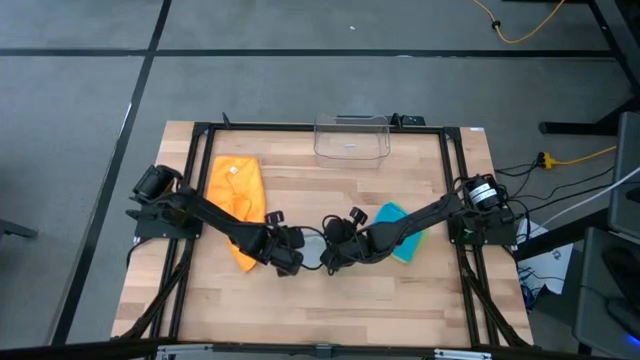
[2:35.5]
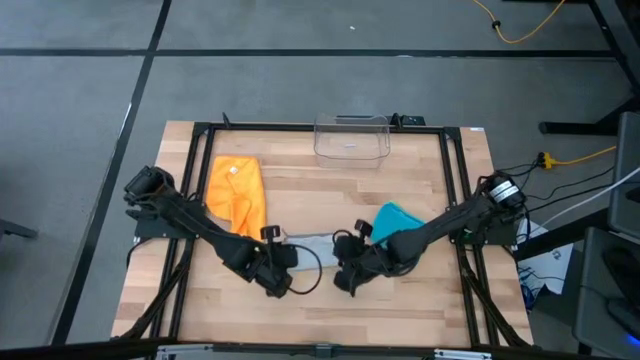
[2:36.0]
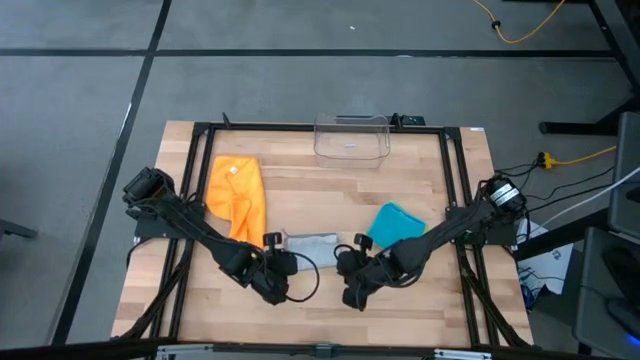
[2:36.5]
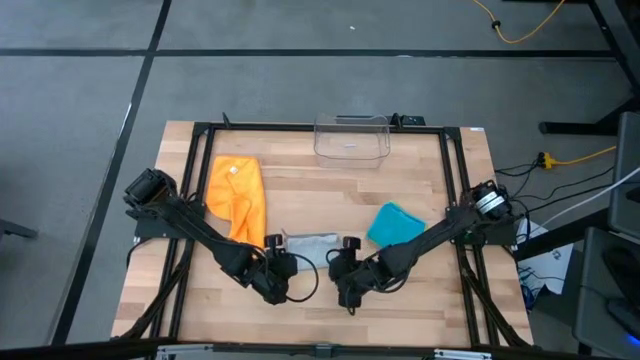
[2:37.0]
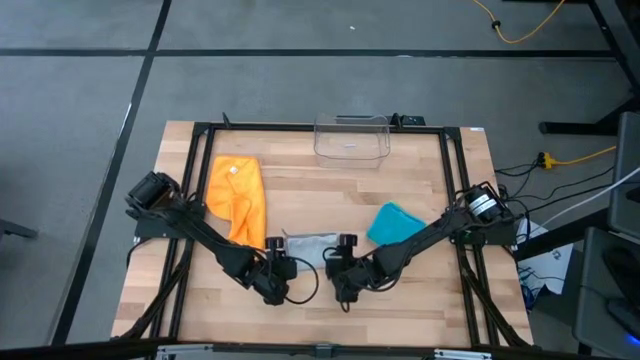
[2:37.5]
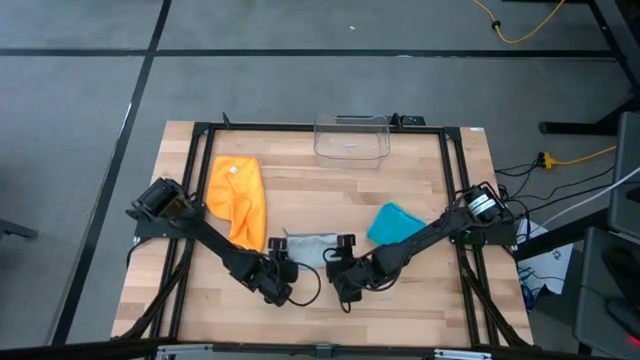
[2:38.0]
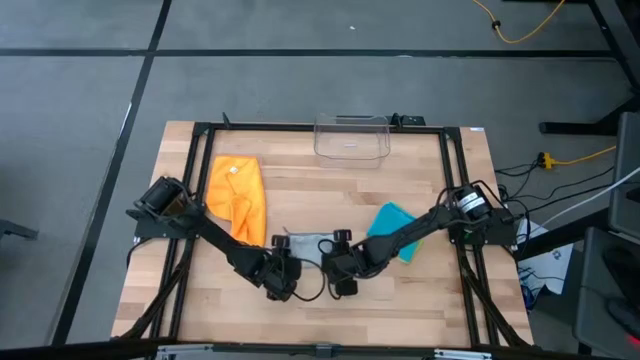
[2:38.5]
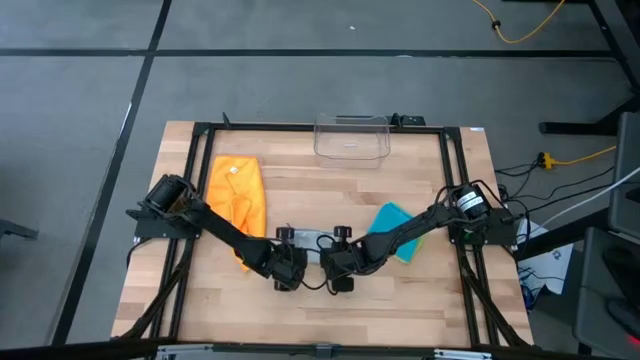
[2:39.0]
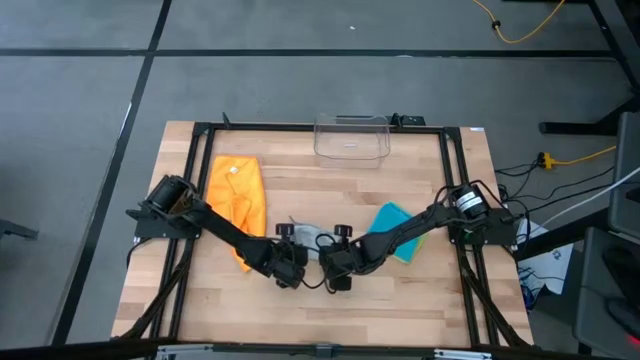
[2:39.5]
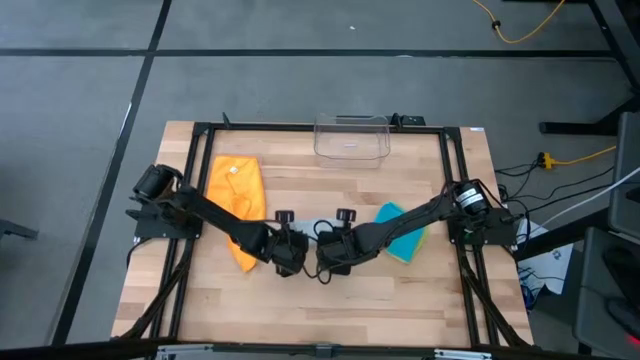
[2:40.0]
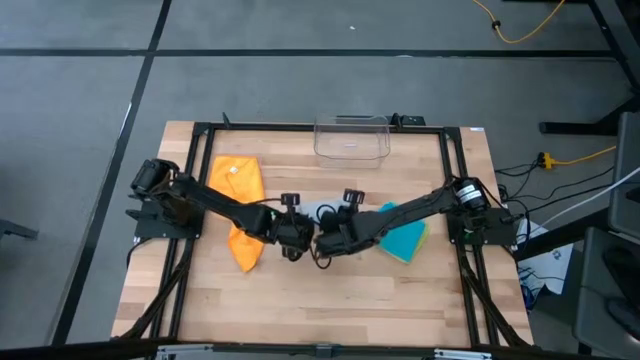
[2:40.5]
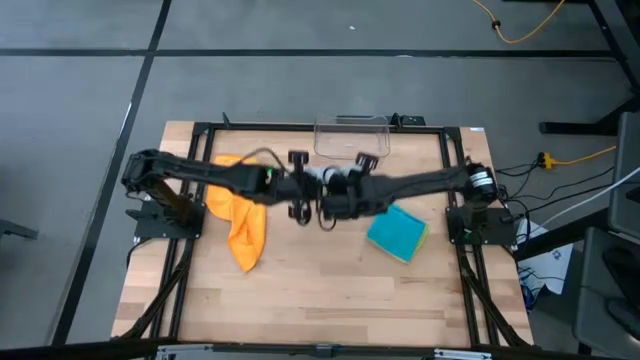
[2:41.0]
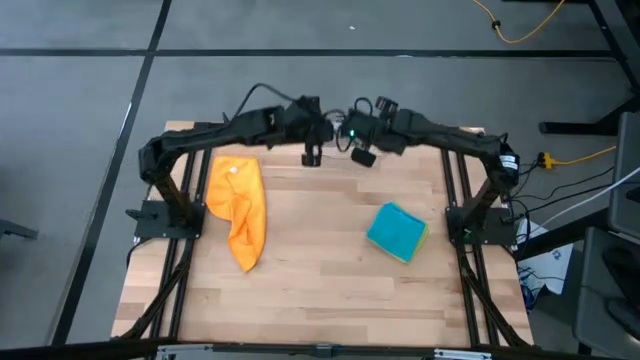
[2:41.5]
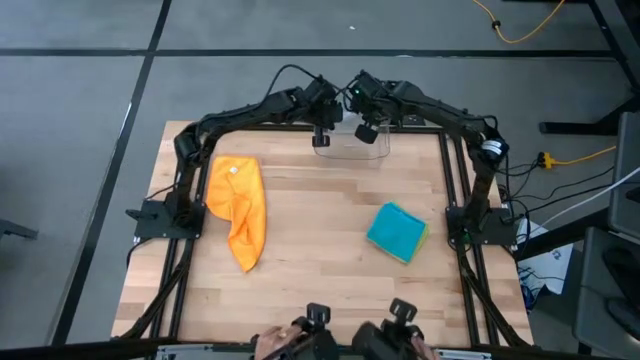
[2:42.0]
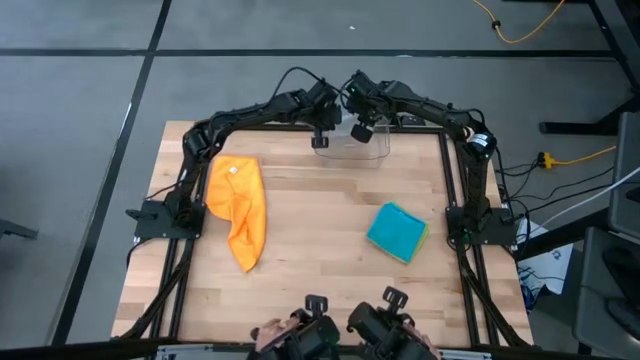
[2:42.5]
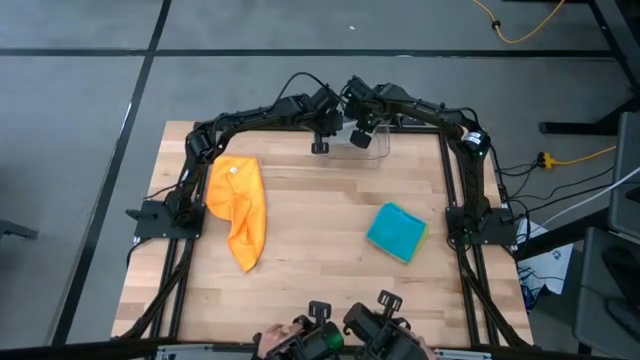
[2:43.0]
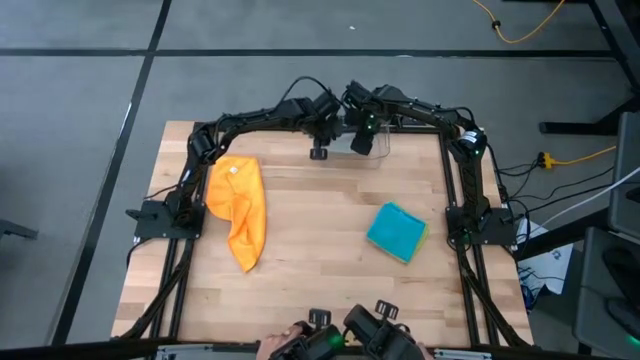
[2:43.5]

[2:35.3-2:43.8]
Task: Fold microfiber towels
Put the gray microfiber towel into the transparent bin

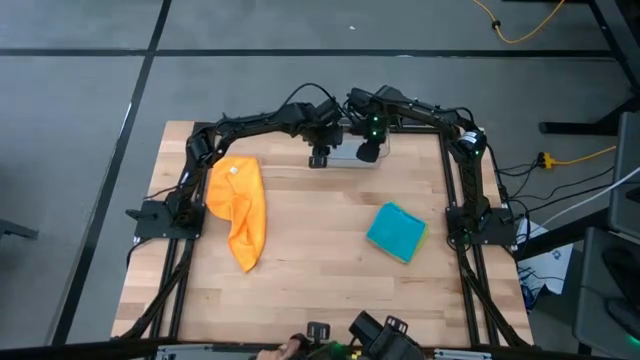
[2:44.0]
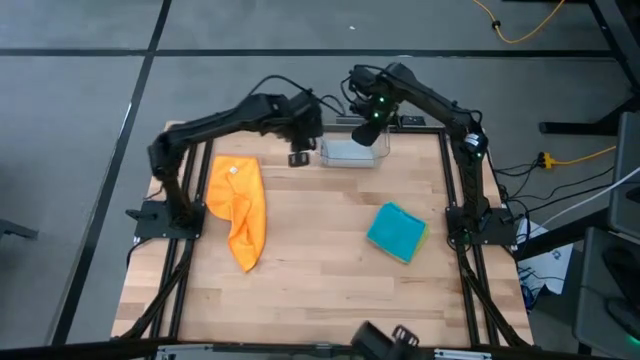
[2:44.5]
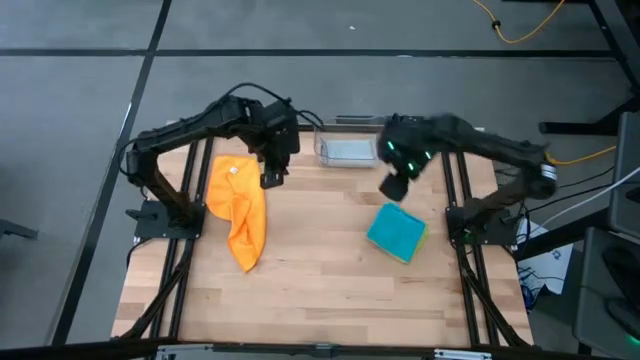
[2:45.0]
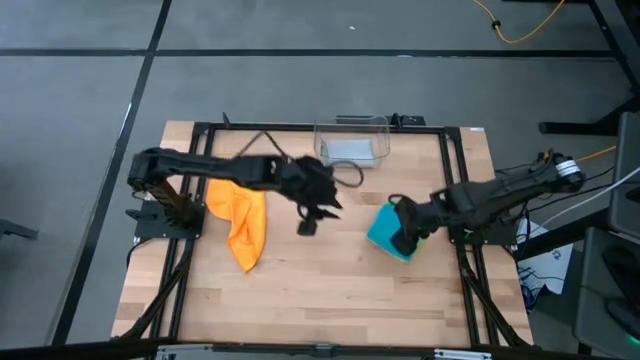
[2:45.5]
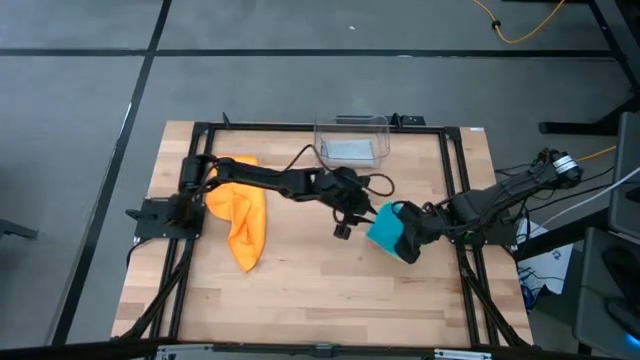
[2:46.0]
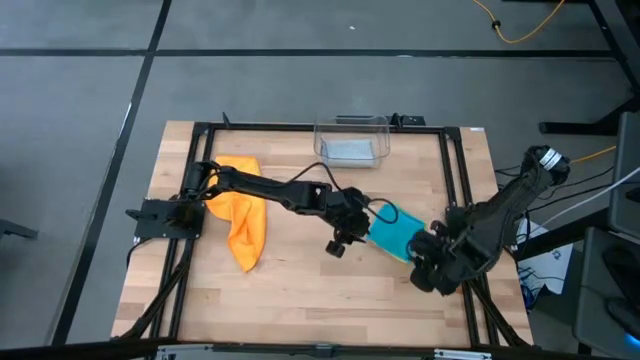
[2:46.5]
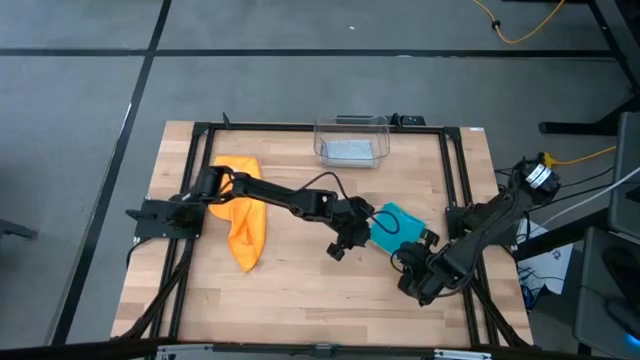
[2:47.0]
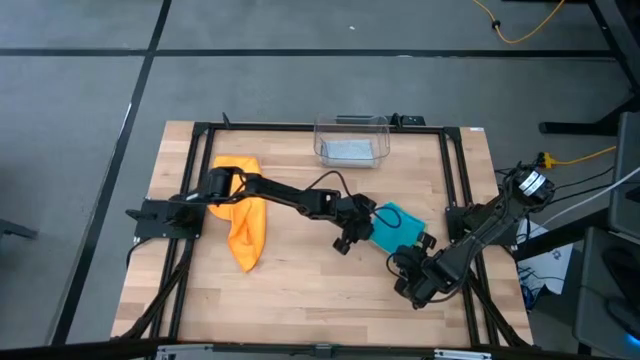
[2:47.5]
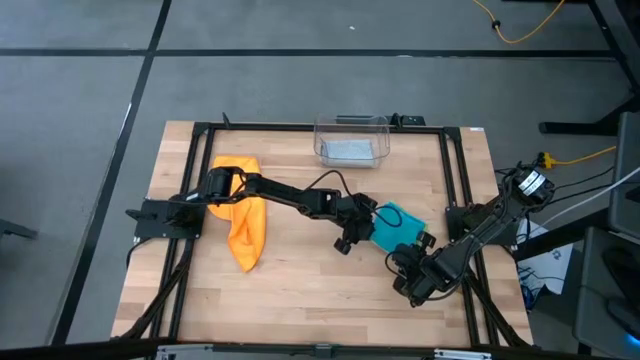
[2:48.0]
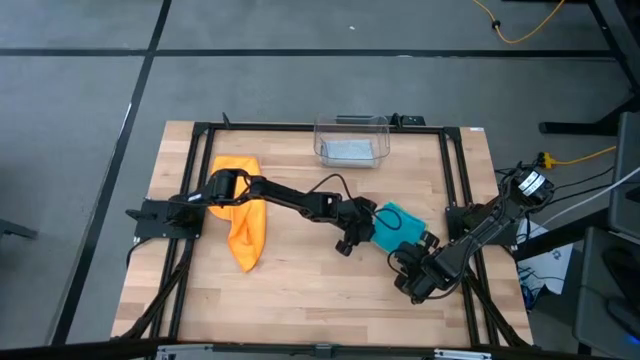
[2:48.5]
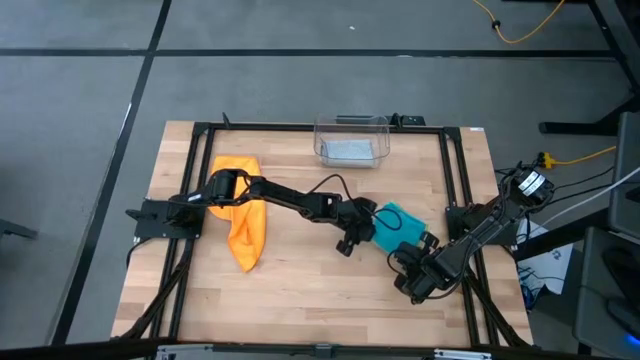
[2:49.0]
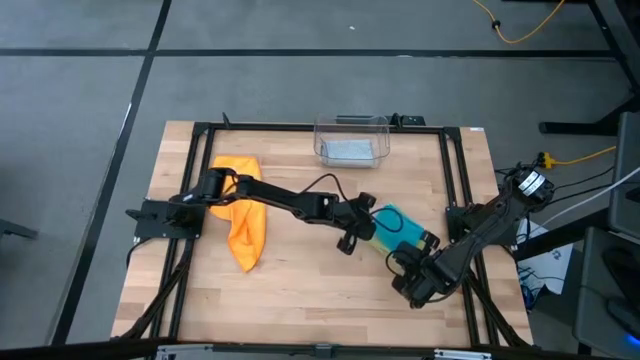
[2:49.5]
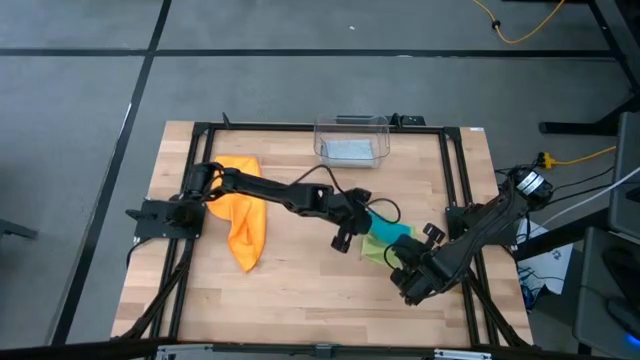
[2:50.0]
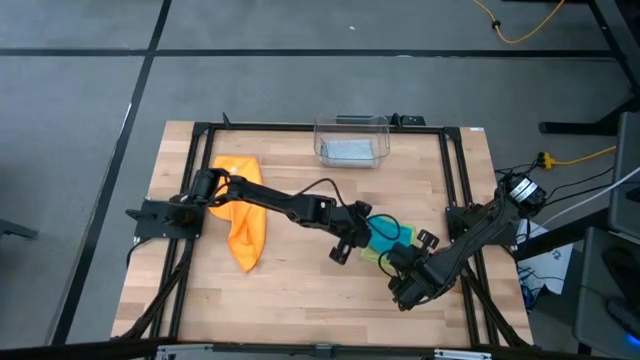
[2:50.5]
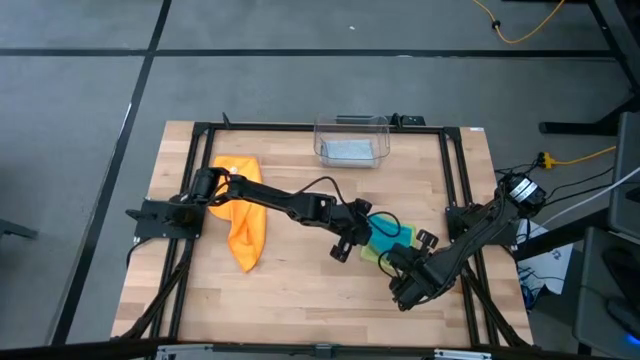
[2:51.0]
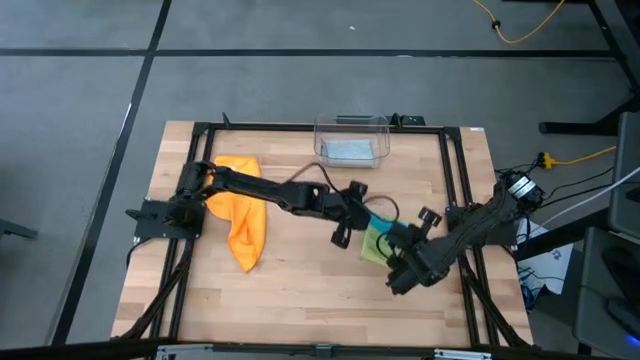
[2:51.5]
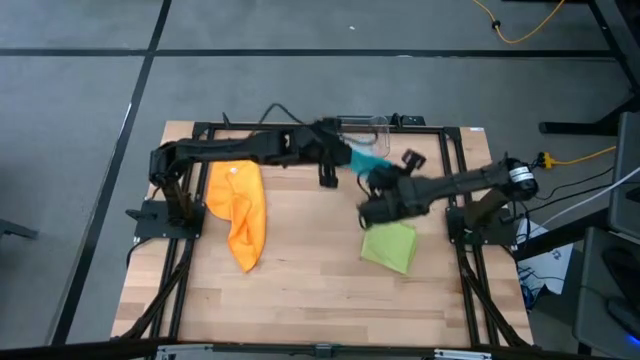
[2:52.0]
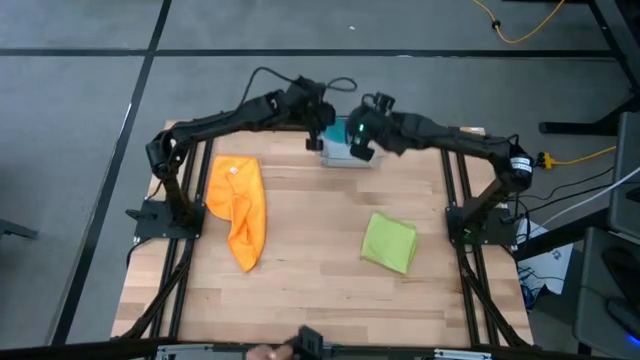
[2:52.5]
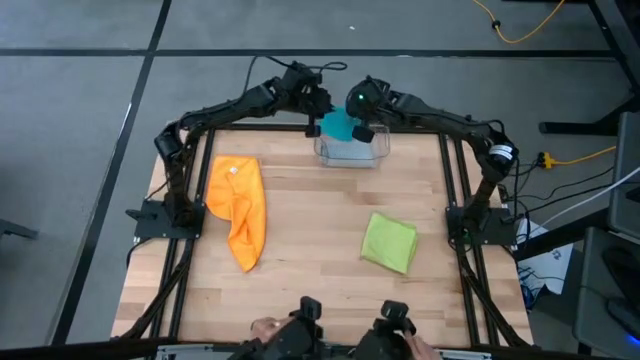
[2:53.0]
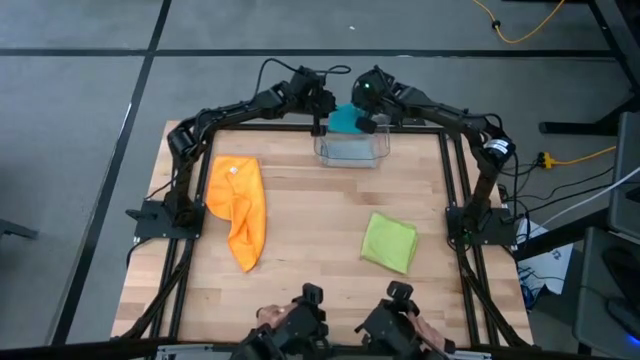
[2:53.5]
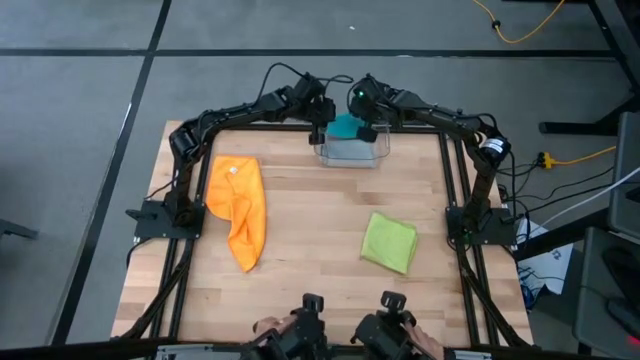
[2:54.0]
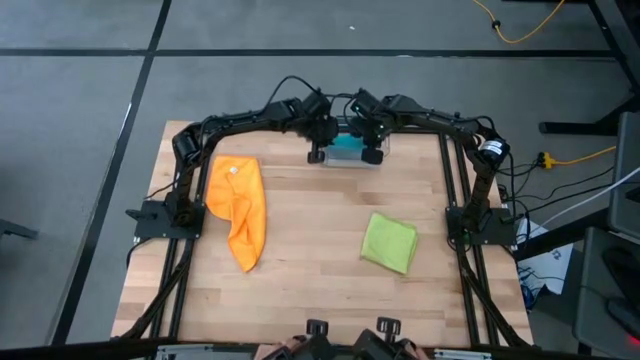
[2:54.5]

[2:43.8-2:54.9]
Put the blue microfiber towel into the transparent bin

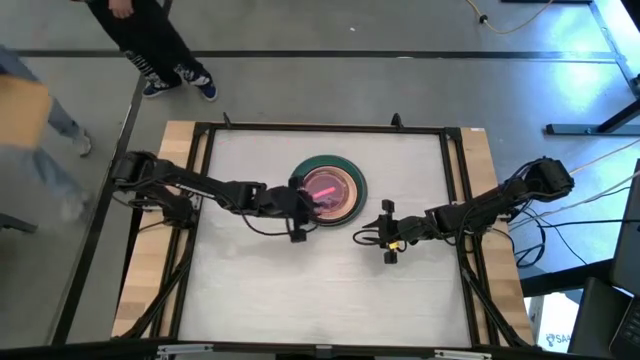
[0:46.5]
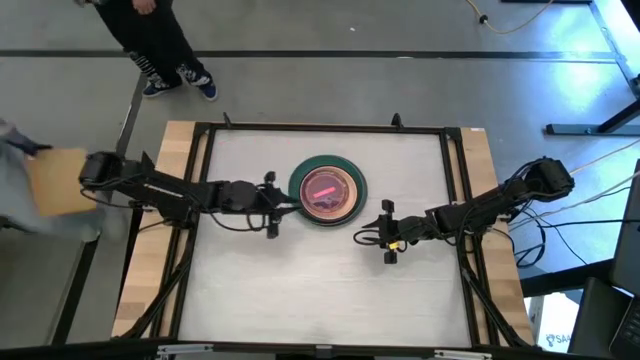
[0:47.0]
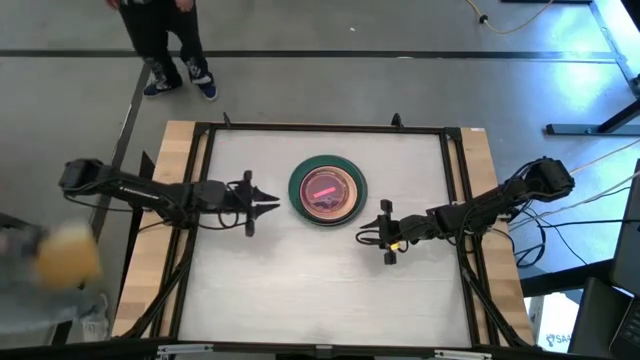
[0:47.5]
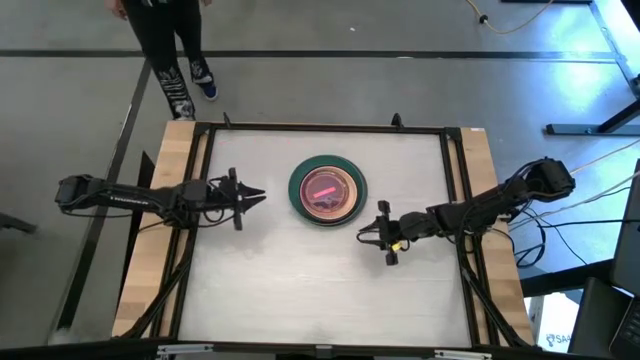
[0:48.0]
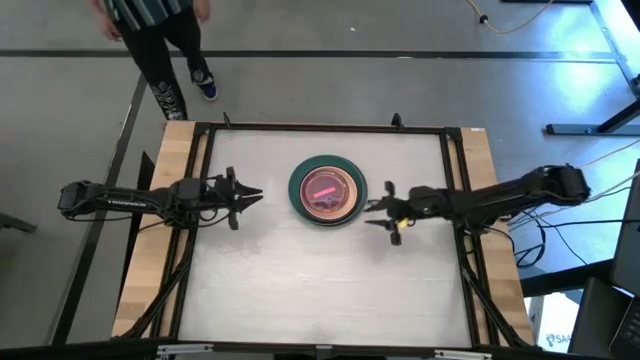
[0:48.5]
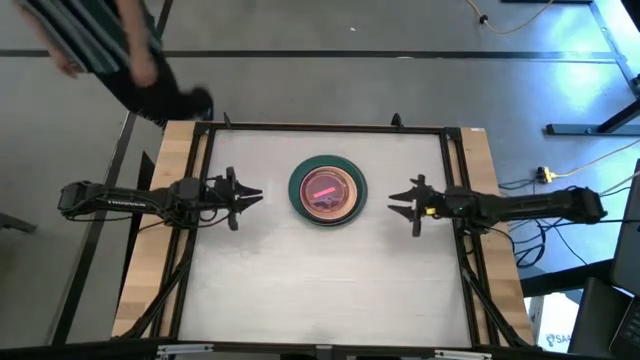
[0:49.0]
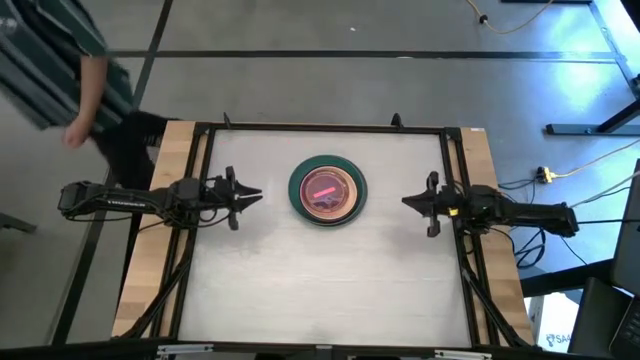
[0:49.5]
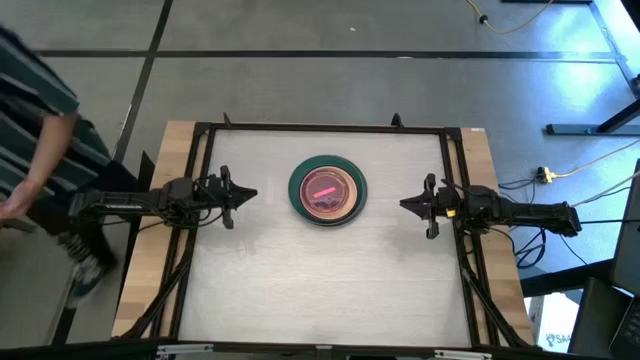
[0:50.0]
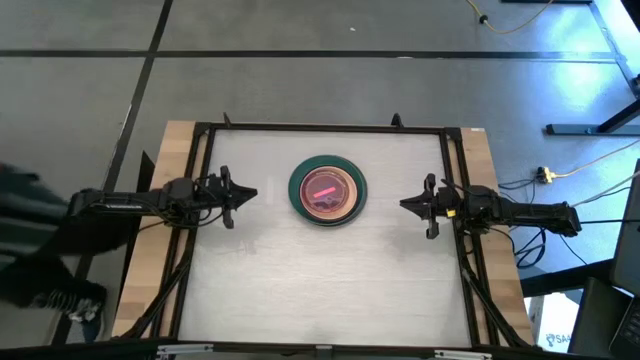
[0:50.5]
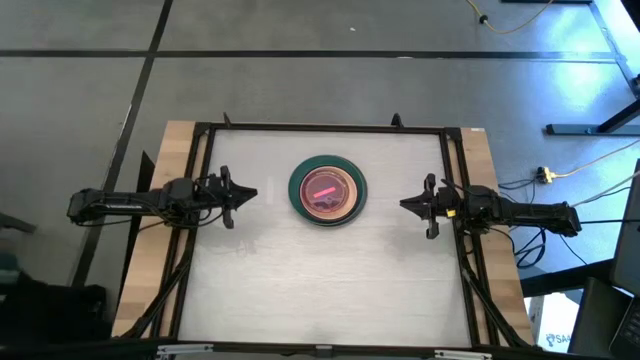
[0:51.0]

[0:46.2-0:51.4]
Task: Stack plastic plates
Return to Home Position
